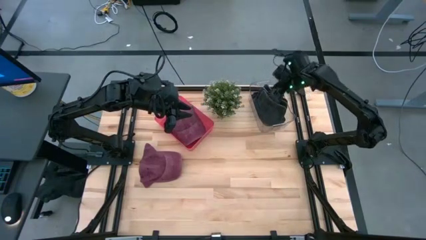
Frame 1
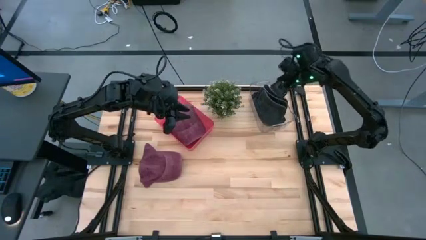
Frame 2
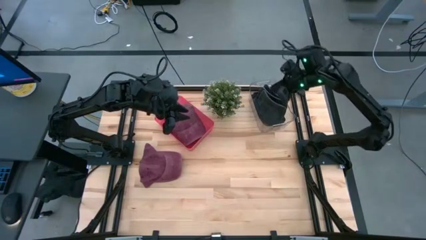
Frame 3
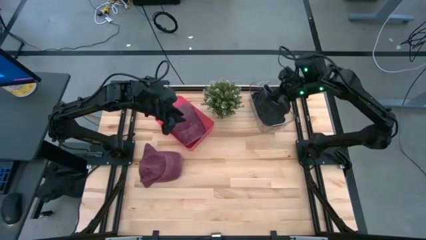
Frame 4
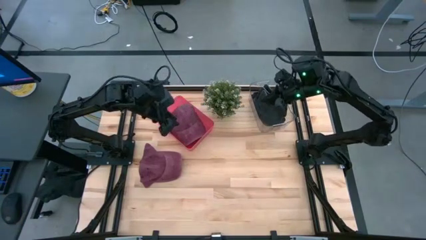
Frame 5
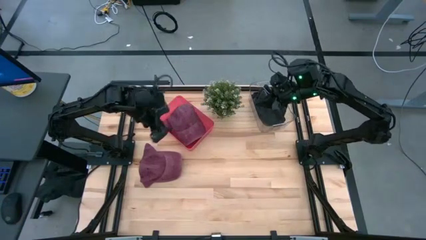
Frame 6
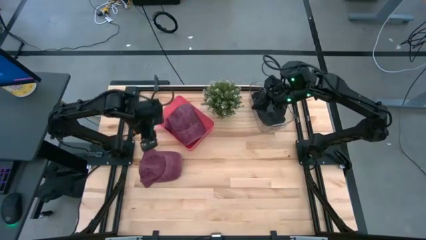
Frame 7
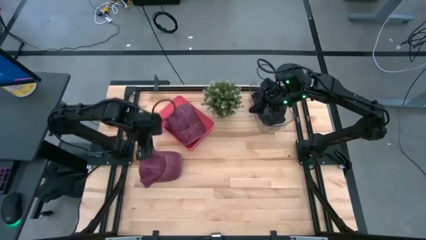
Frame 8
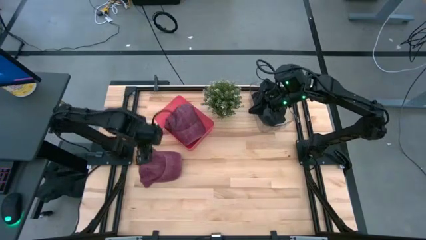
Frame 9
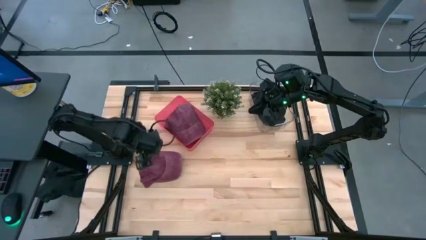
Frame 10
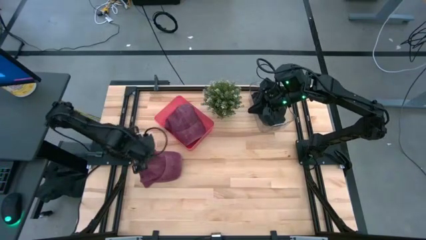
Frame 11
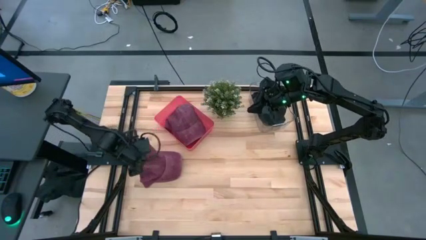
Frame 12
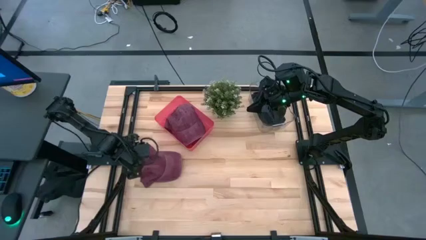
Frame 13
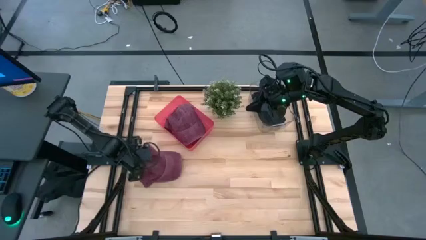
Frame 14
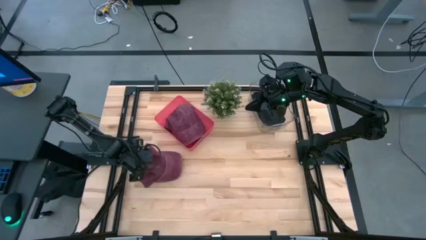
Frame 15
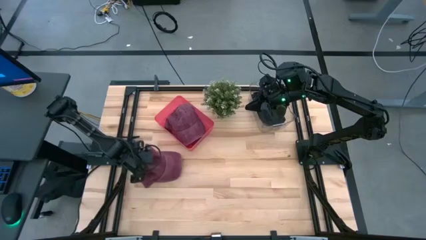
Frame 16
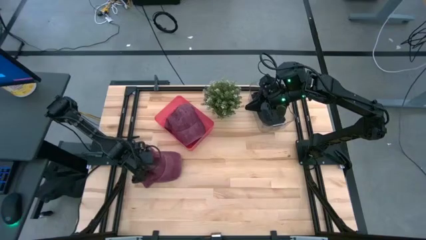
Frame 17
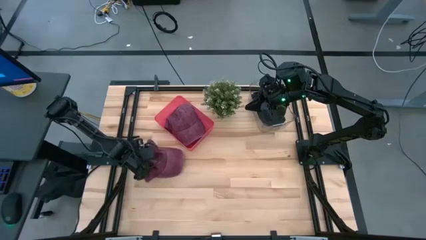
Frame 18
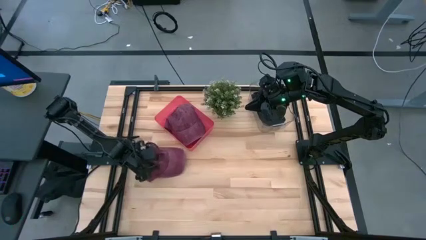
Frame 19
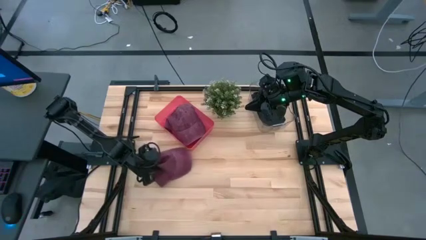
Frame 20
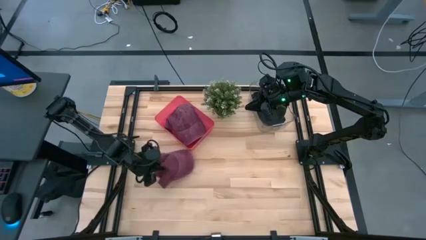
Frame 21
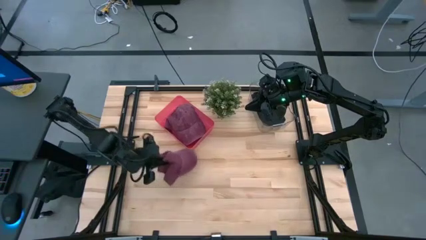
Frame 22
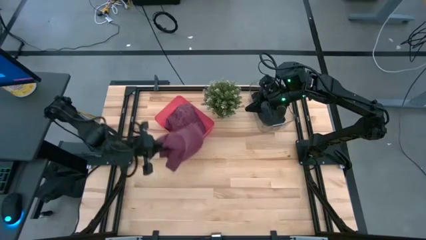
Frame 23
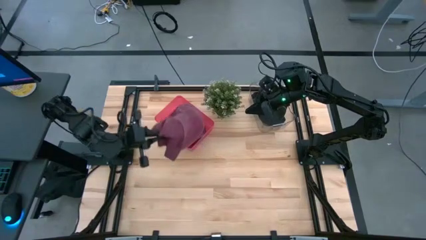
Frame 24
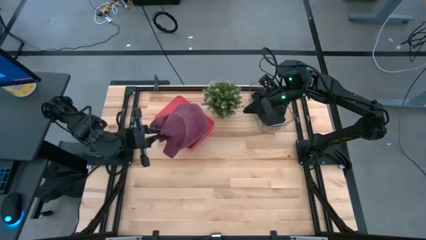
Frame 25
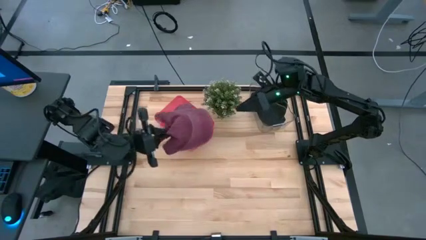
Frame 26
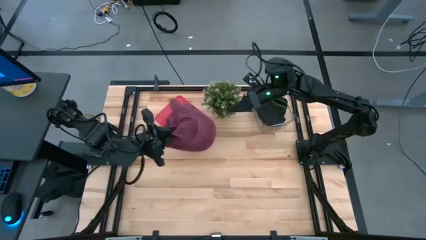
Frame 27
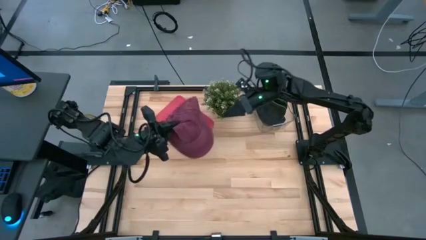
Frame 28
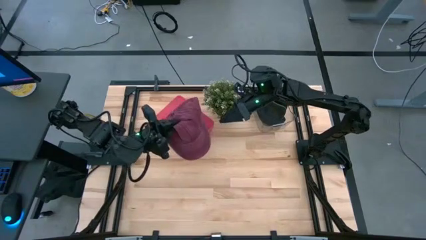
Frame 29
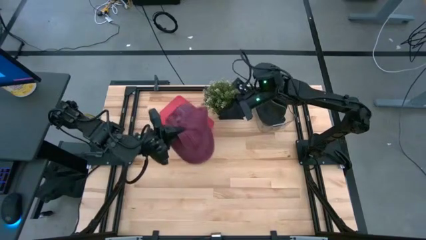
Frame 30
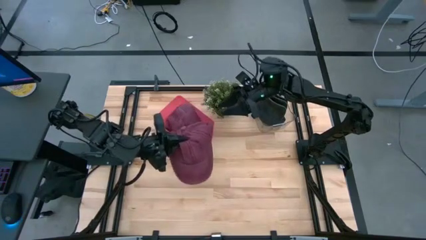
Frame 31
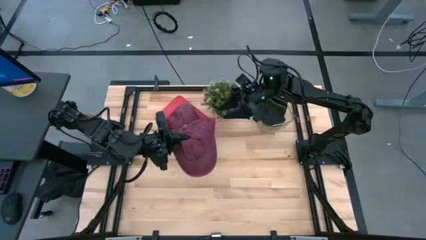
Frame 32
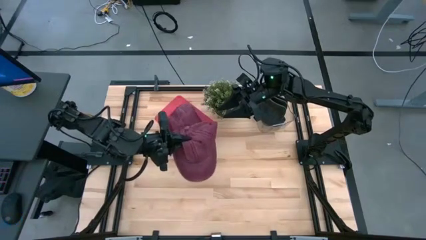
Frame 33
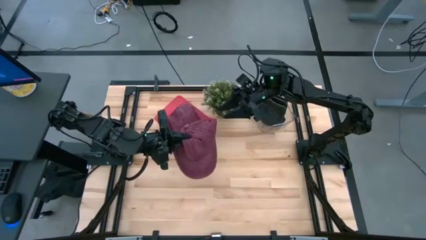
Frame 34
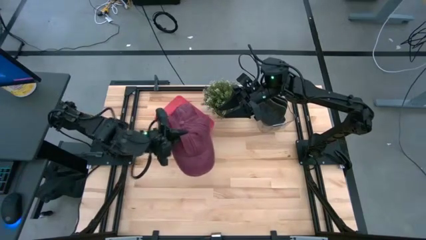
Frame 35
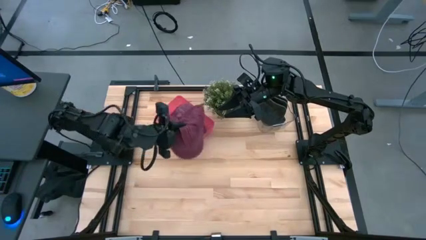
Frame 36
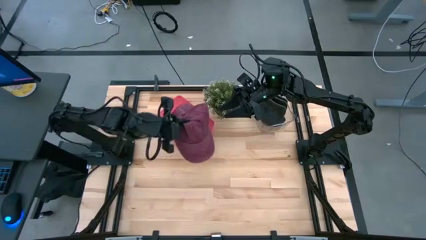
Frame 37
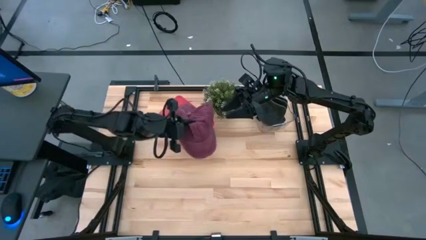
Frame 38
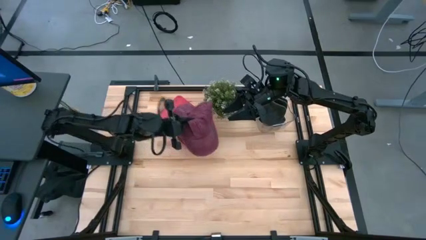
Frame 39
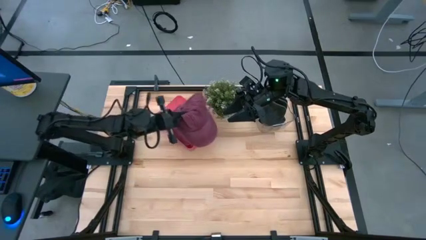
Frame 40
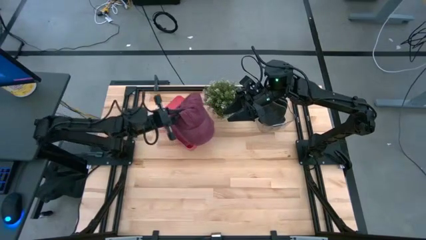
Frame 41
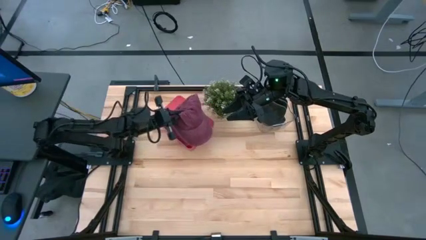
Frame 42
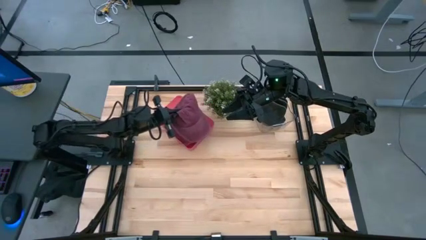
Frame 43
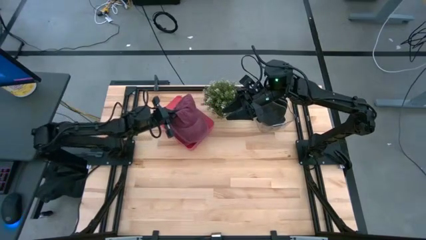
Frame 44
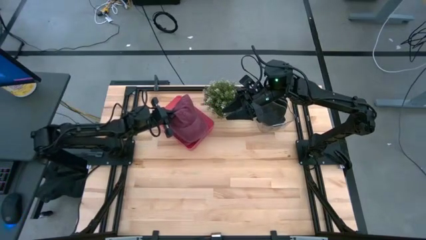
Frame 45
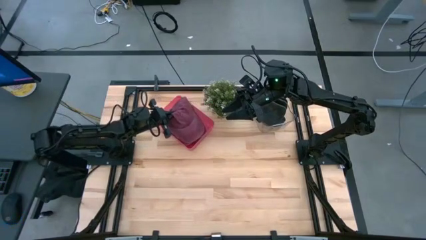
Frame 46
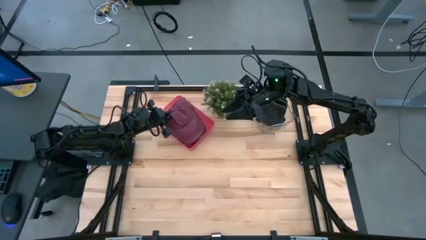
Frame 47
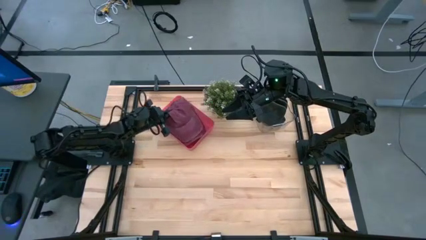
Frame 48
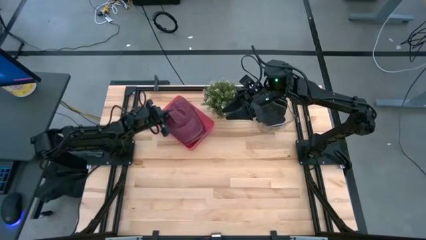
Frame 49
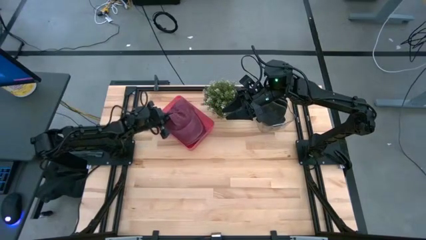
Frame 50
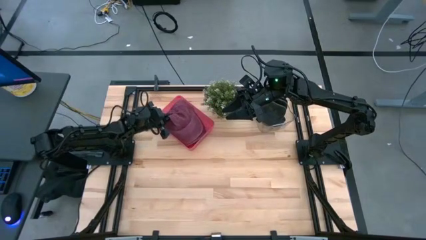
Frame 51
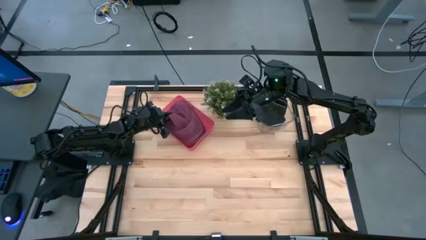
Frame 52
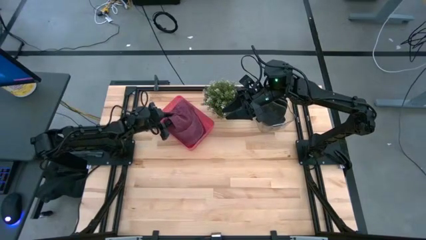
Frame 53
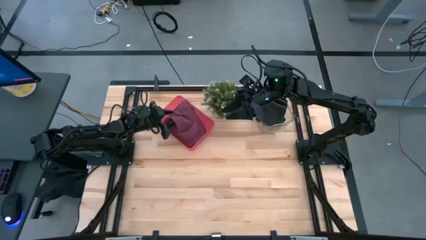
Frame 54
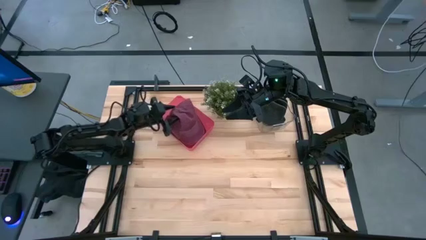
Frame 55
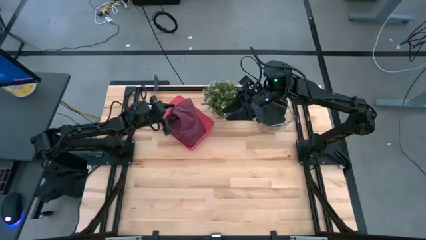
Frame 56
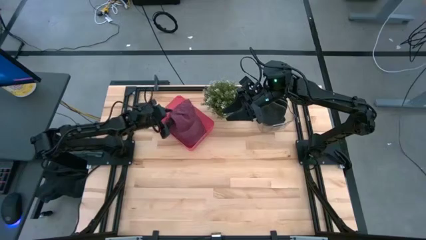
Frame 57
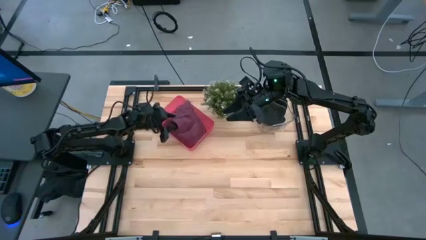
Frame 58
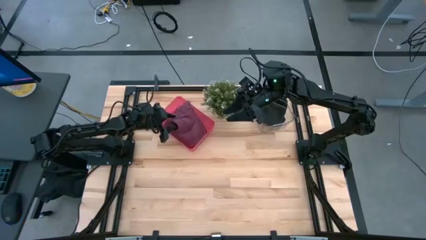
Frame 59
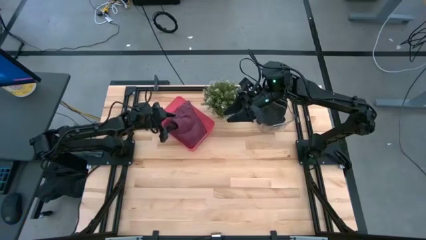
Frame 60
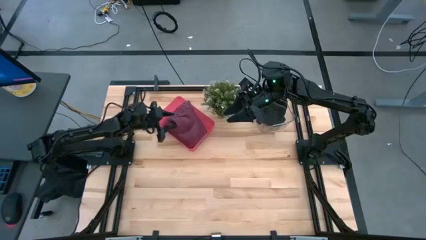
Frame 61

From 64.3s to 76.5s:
Task: Pick & Place hat
Put the red cap into the red bin
